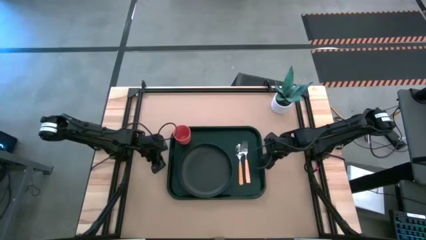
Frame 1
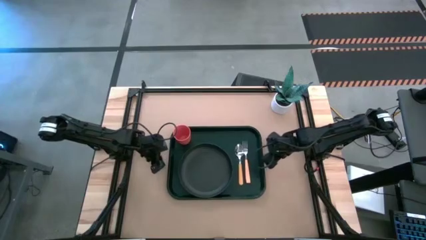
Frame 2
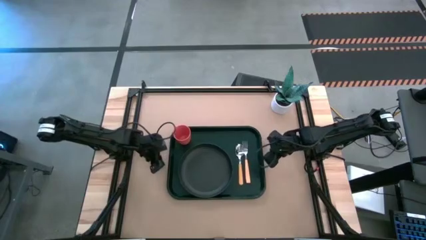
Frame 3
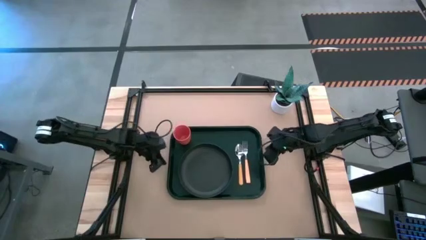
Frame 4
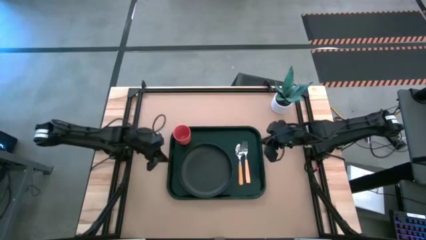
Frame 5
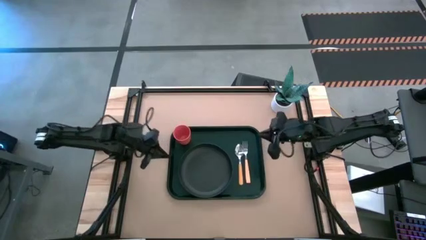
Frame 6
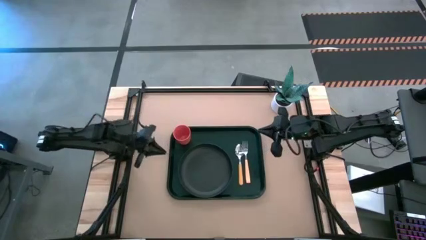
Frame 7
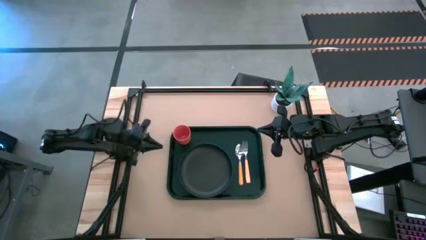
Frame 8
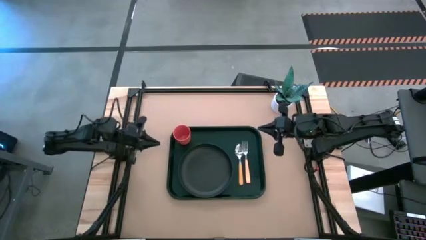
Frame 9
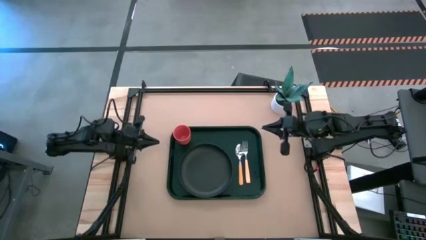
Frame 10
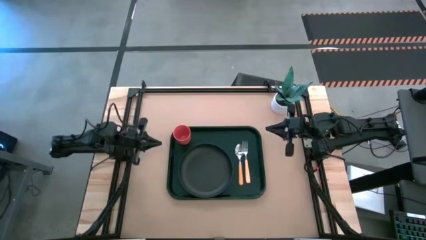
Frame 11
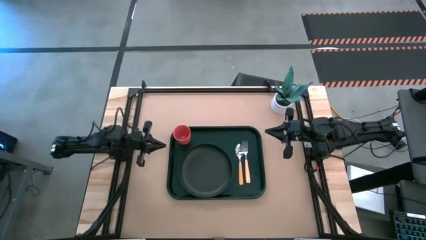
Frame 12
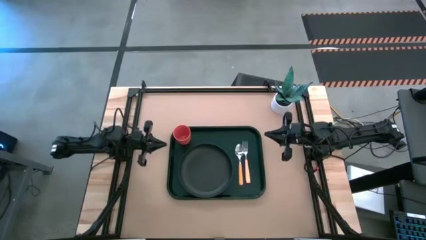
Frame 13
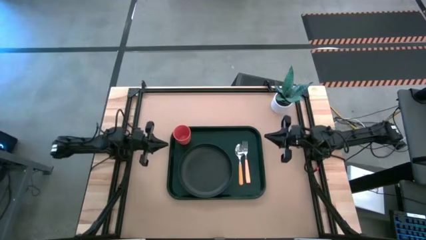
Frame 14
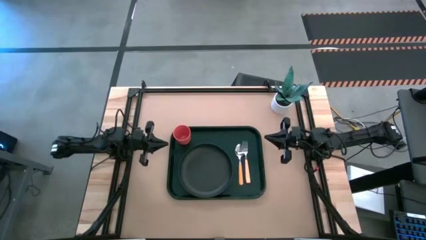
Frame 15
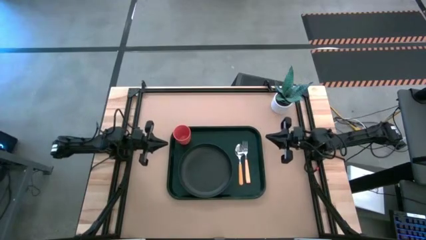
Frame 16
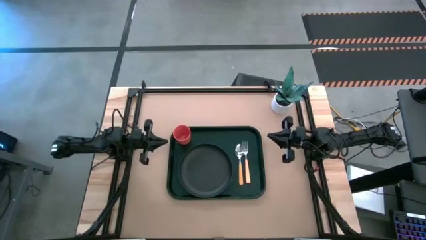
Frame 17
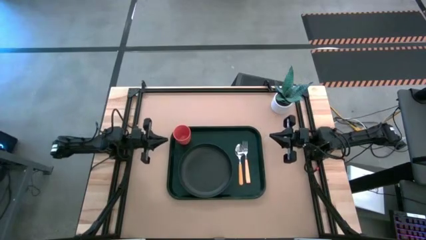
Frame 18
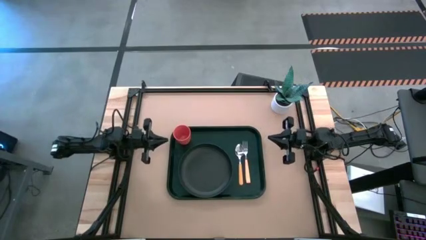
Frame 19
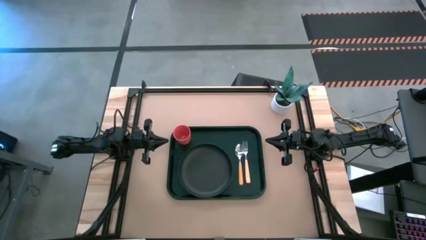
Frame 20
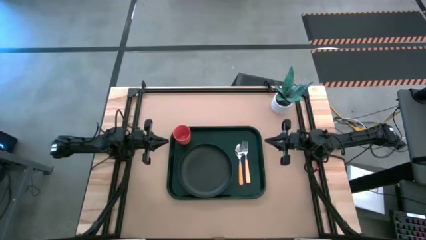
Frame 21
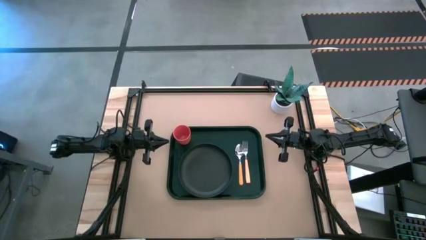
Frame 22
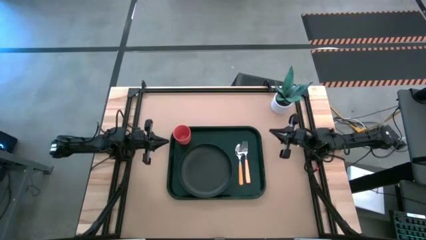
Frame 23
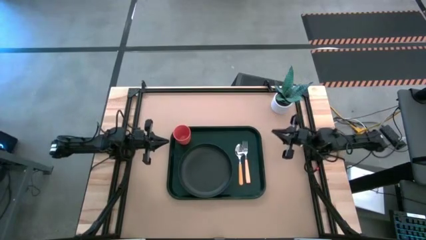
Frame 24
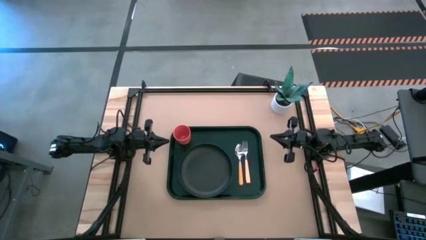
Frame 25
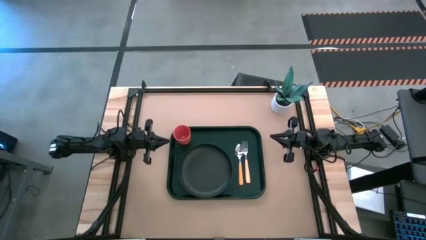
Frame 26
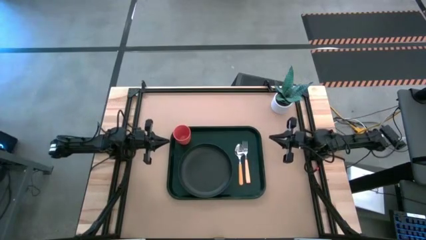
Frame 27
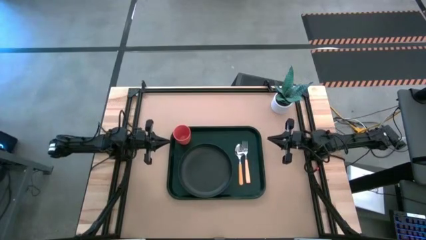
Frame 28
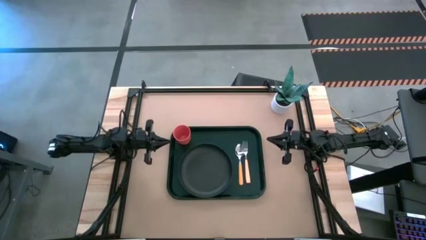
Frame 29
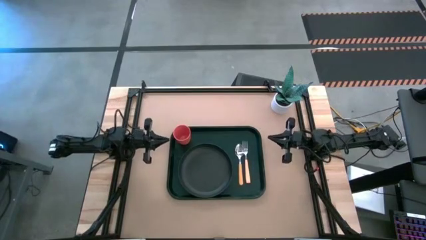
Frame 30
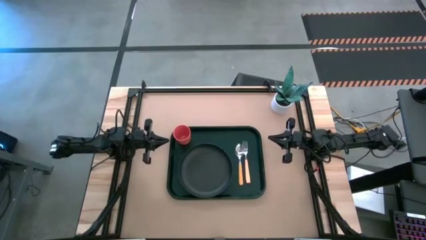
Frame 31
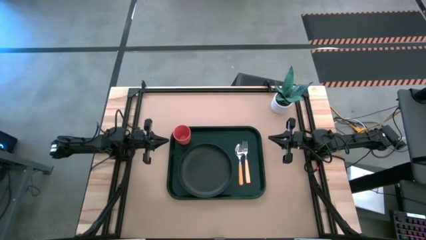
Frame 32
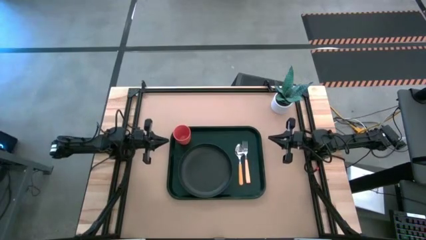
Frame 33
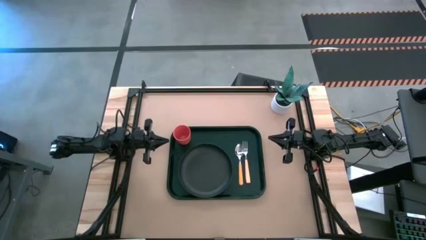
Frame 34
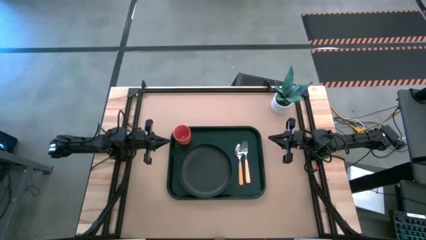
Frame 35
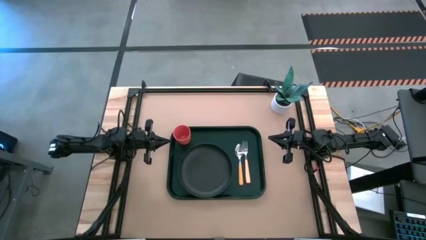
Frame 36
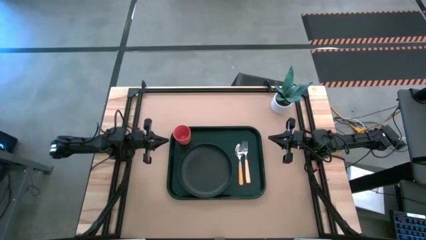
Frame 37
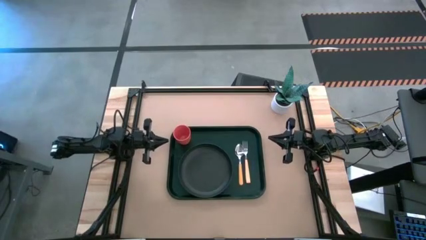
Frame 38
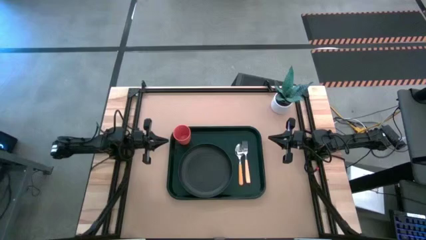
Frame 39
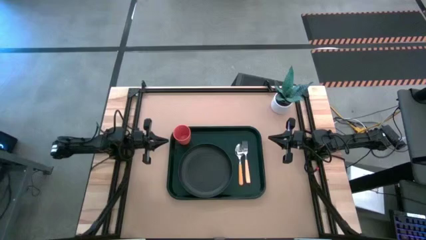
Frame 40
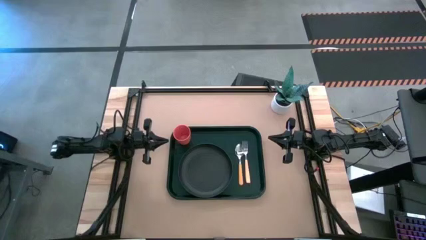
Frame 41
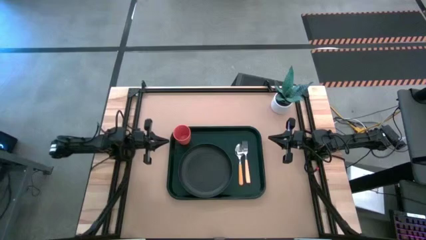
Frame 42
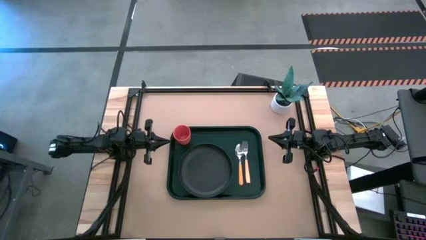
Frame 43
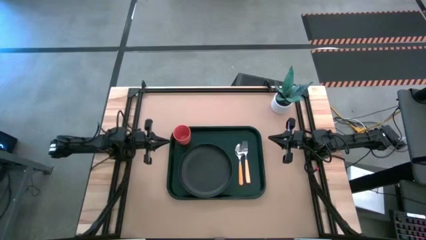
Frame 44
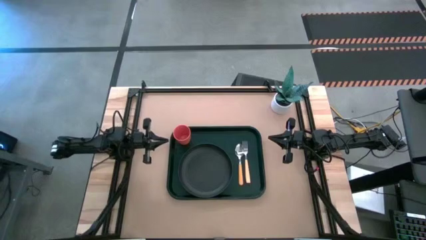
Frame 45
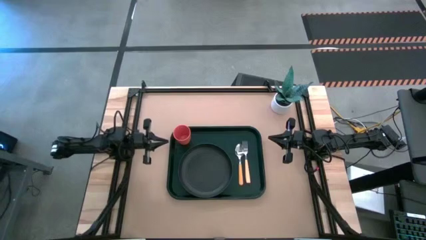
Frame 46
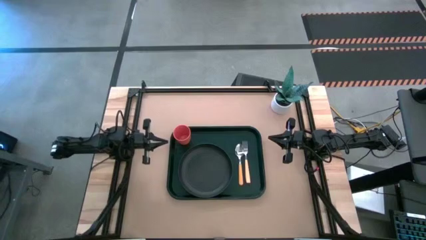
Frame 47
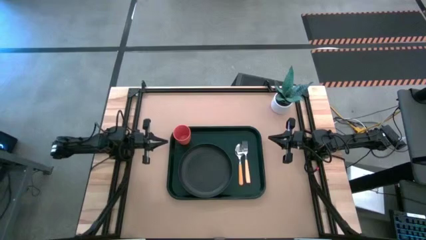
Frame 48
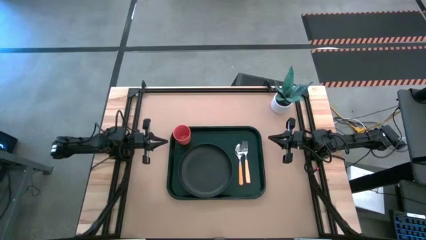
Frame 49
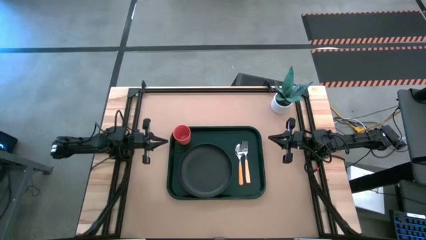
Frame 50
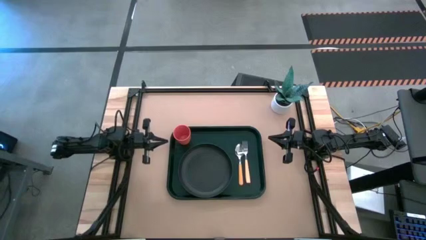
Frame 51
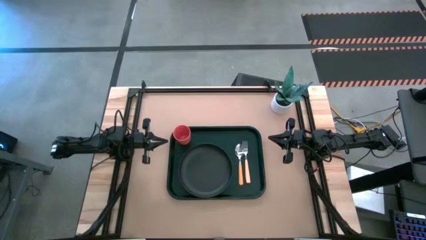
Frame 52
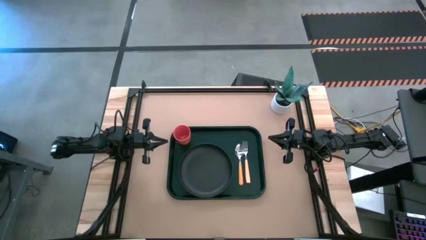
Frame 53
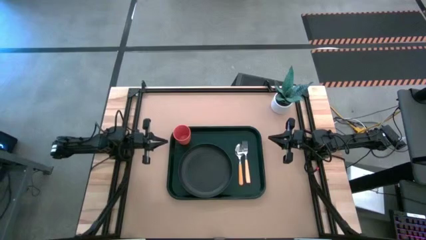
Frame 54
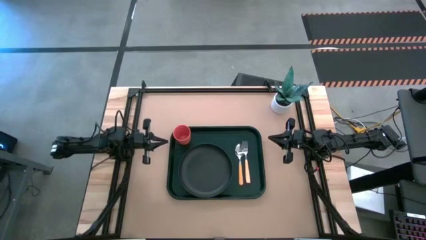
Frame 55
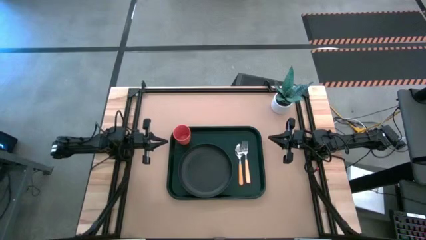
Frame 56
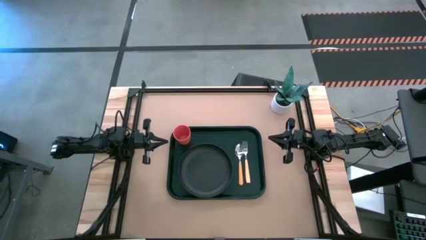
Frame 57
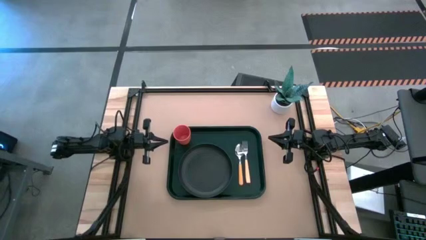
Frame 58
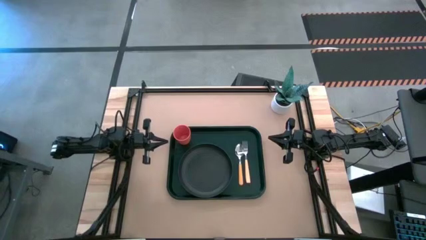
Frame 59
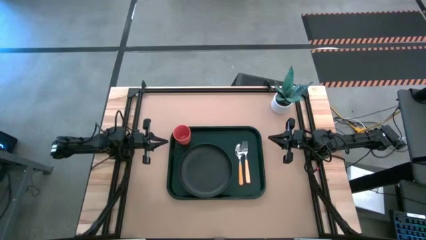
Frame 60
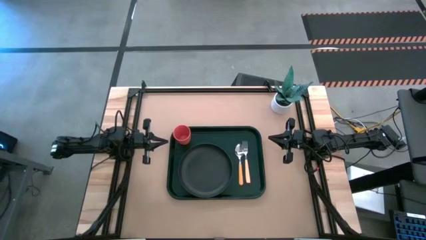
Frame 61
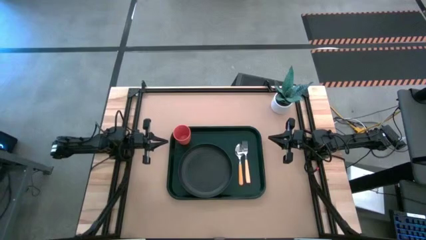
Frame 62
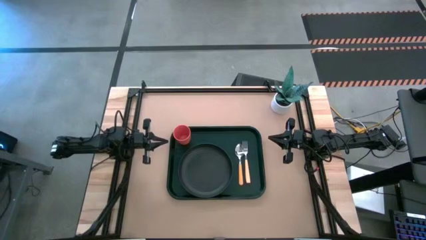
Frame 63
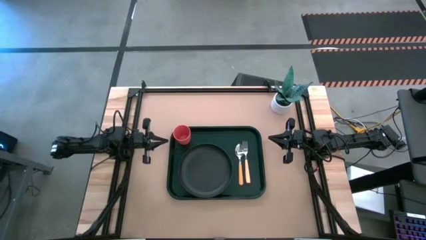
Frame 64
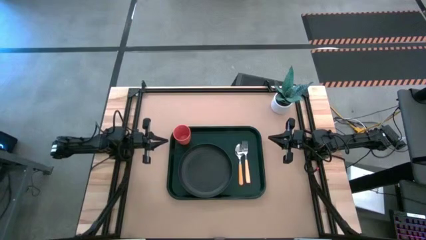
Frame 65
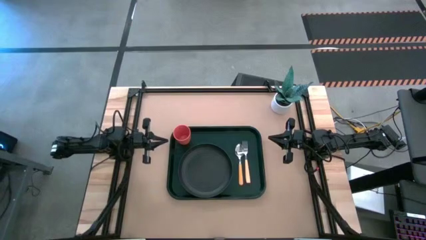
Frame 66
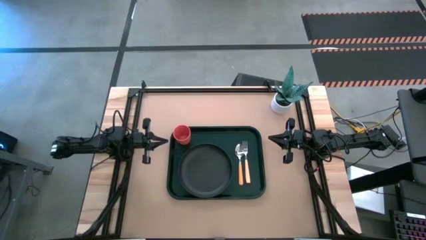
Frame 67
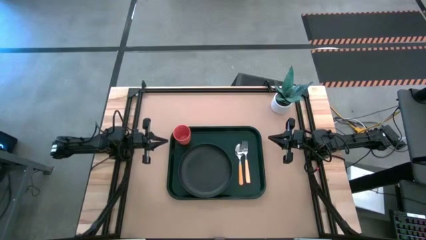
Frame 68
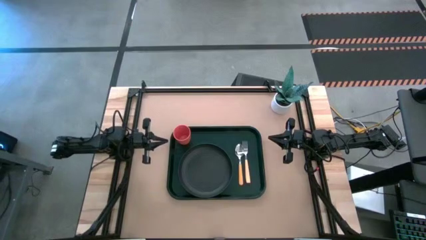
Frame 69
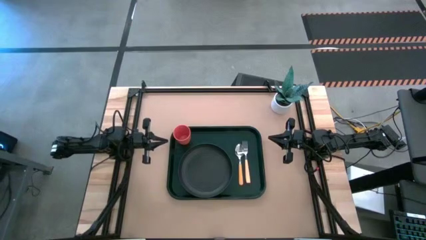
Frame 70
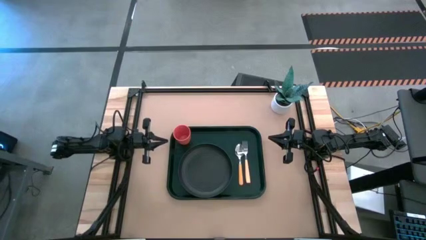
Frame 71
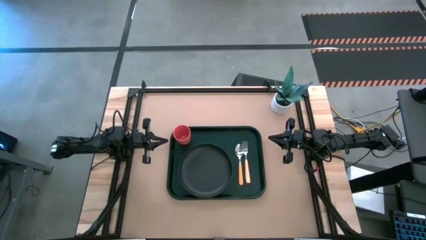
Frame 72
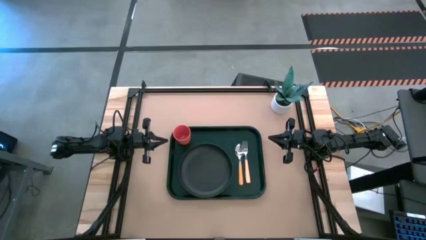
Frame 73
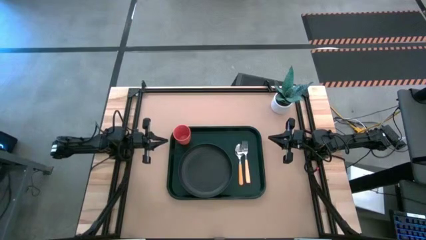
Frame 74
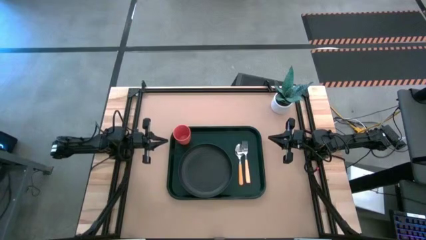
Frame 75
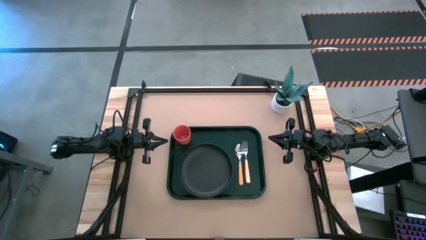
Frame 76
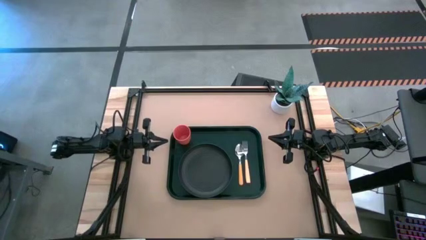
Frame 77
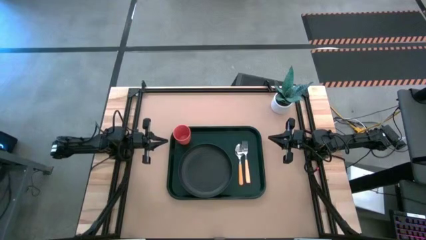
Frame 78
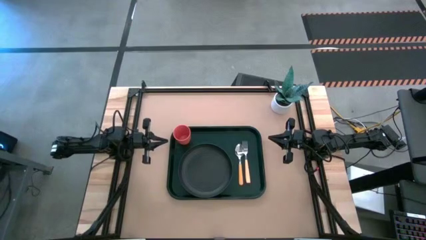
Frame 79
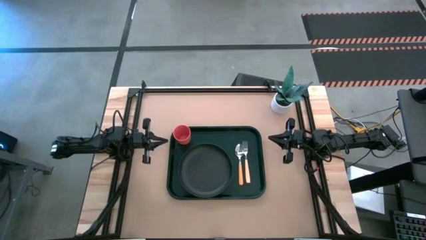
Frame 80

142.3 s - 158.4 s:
Task: Pick and place plate/cup/fork/spoon on tray
Return to Home Position

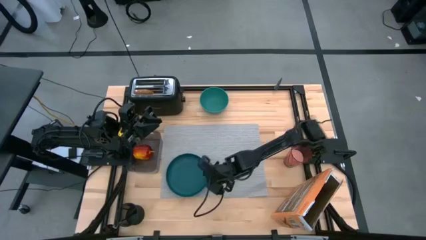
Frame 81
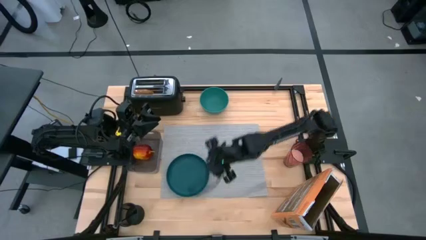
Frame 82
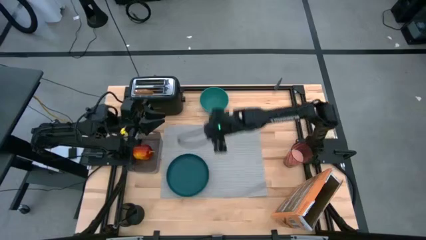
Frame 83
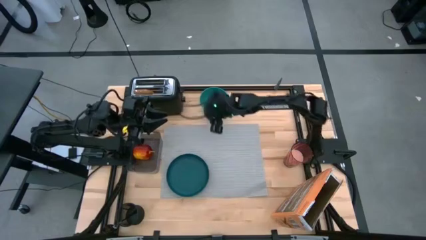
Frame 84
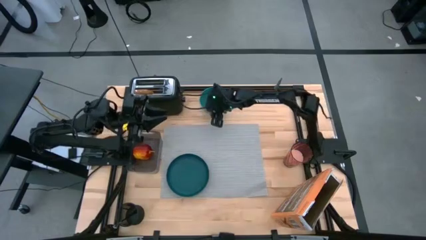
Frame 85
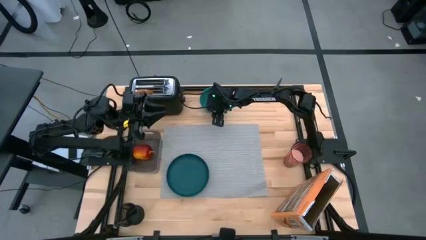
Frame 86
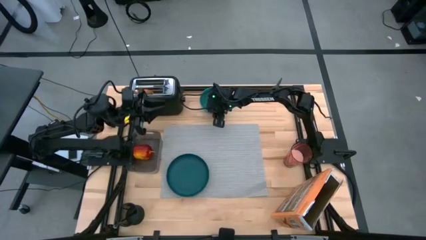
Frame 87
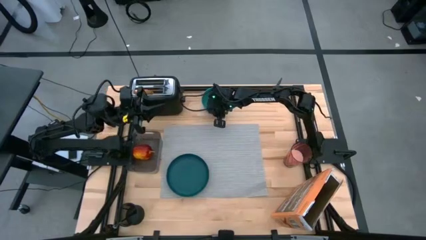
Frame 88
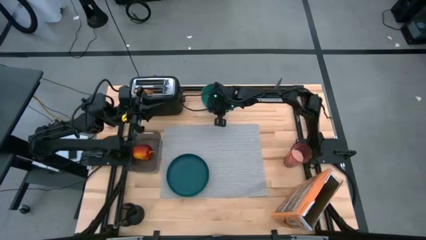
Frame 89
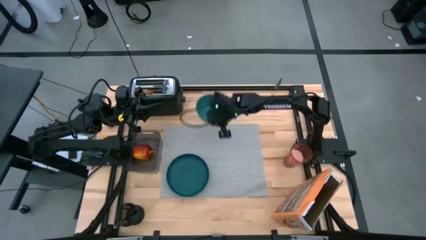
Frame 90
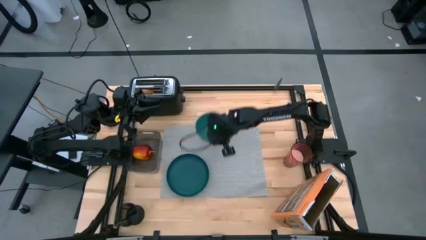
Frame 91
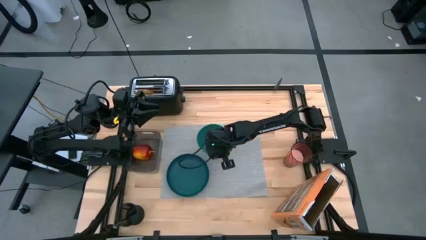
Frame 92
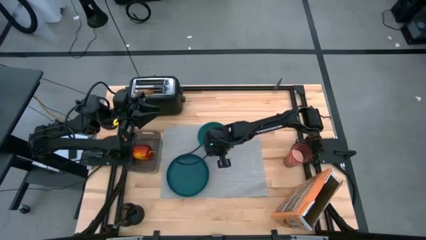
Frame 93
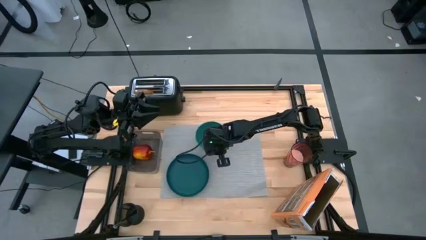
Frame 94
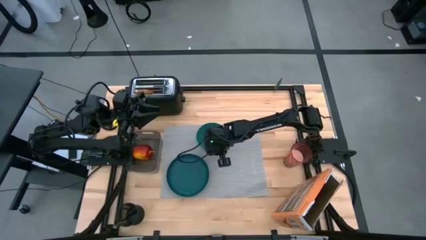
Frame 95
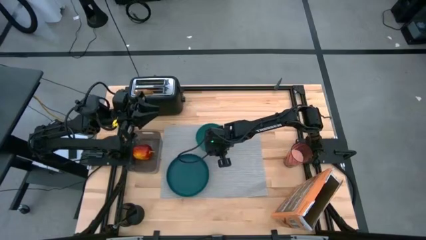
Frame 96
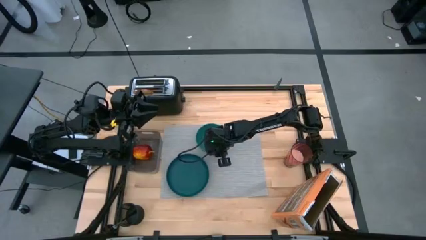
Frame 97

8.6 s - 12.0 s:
Task: Arrange a breakfast setting
Put the green bowl on the top of the mat
